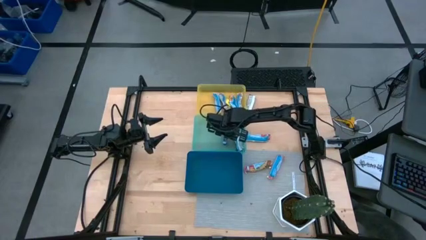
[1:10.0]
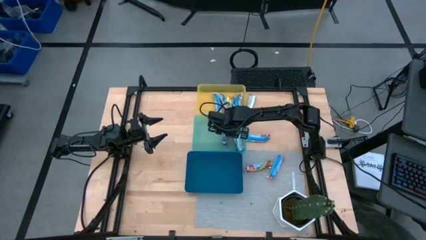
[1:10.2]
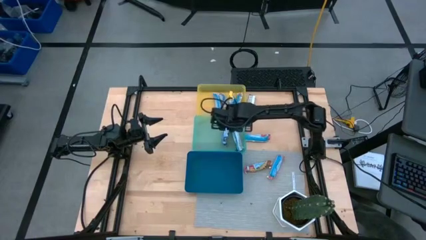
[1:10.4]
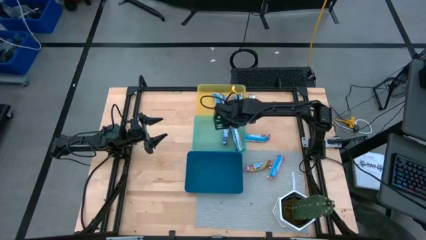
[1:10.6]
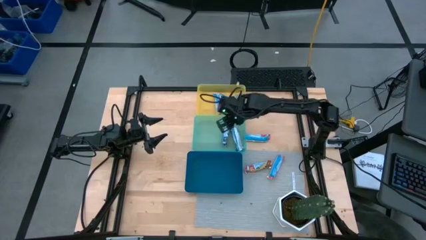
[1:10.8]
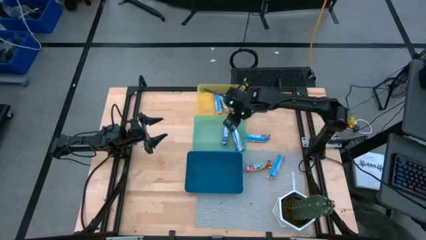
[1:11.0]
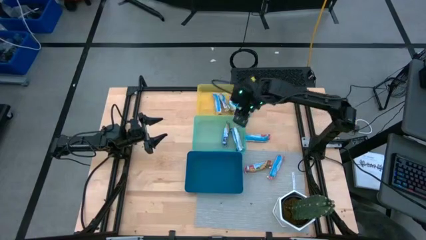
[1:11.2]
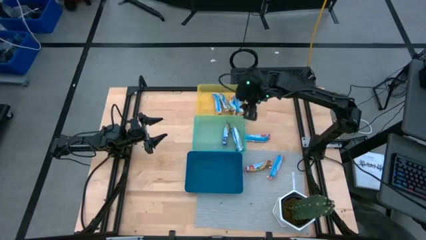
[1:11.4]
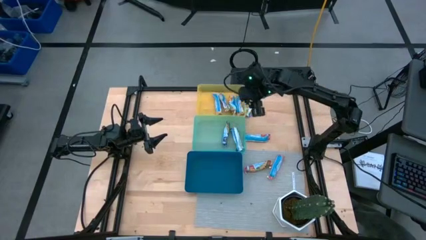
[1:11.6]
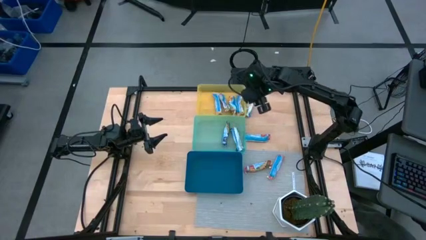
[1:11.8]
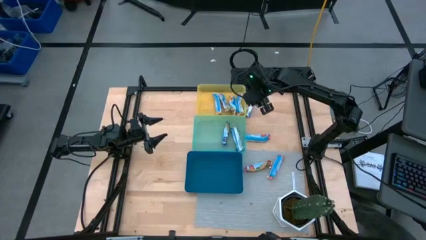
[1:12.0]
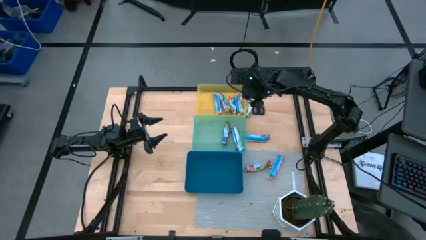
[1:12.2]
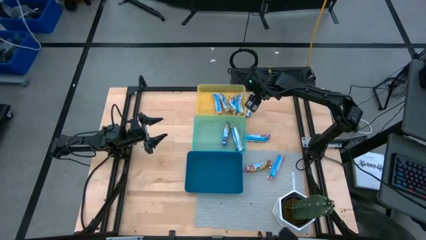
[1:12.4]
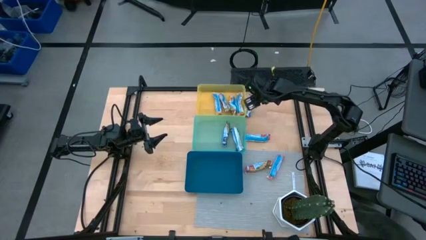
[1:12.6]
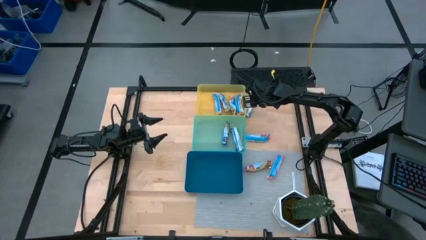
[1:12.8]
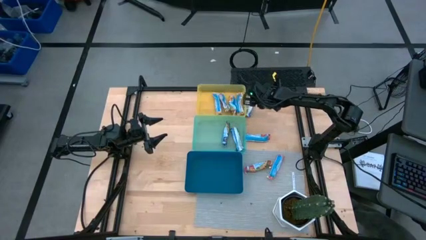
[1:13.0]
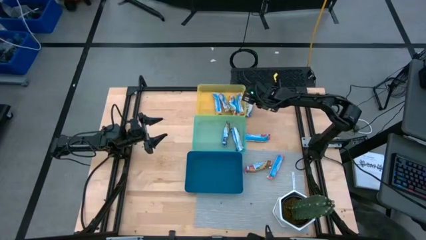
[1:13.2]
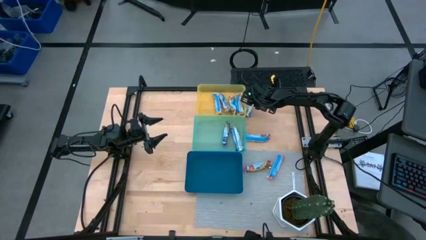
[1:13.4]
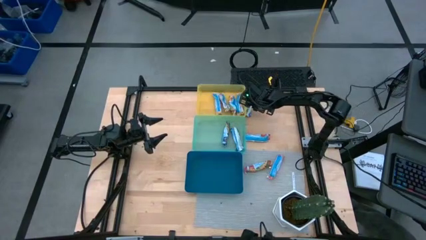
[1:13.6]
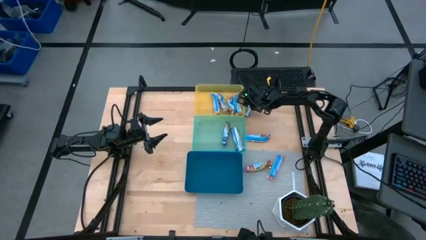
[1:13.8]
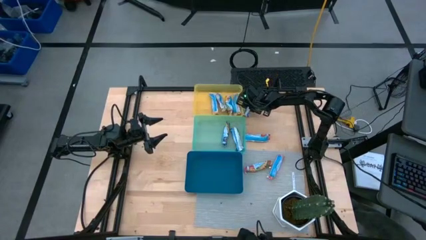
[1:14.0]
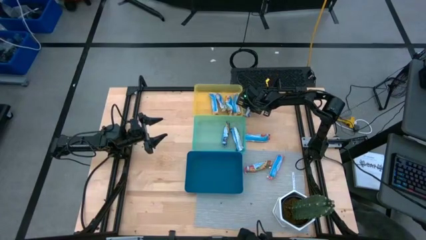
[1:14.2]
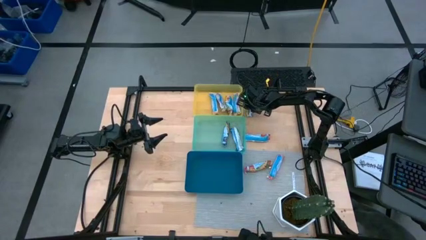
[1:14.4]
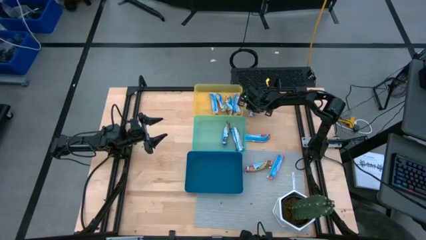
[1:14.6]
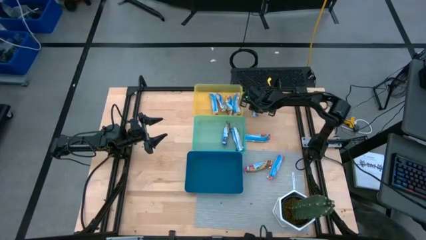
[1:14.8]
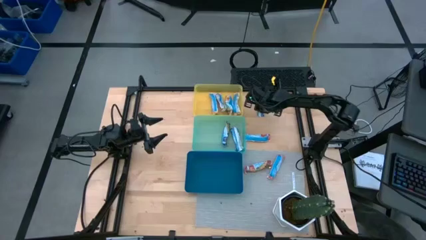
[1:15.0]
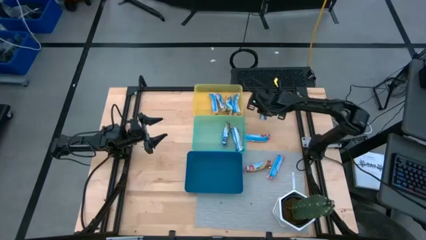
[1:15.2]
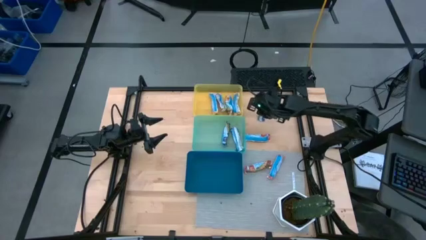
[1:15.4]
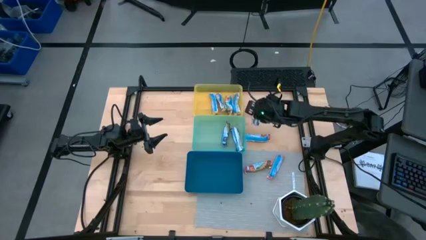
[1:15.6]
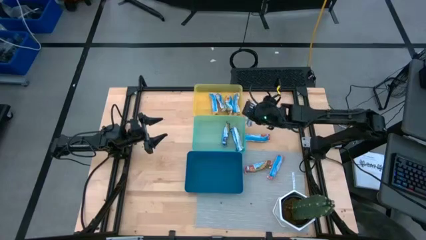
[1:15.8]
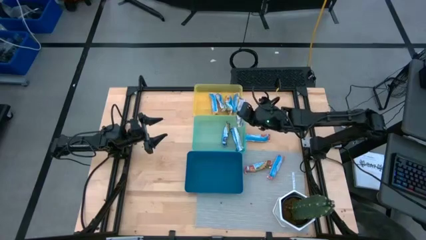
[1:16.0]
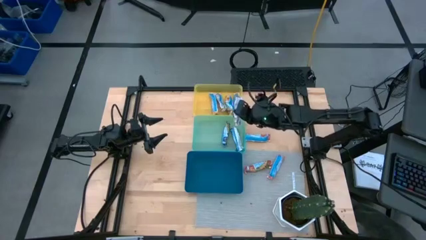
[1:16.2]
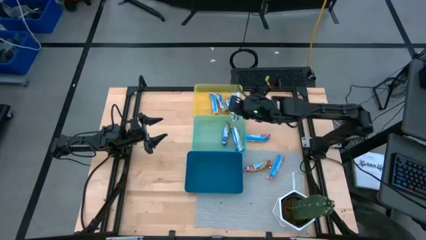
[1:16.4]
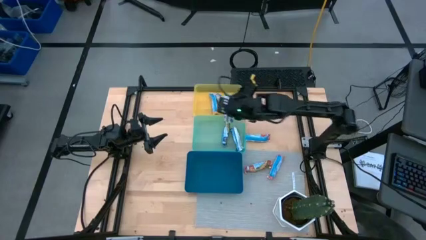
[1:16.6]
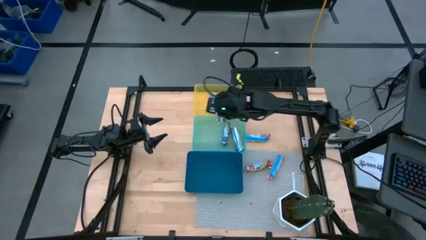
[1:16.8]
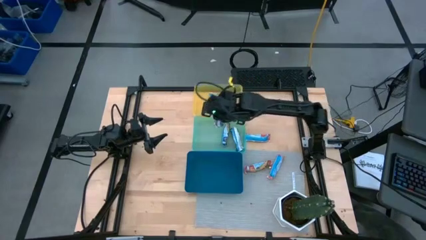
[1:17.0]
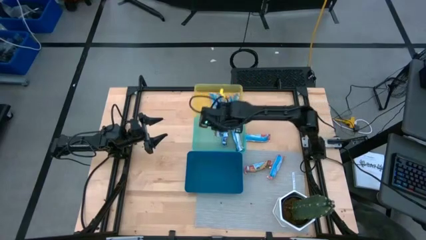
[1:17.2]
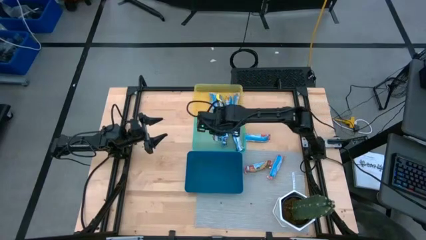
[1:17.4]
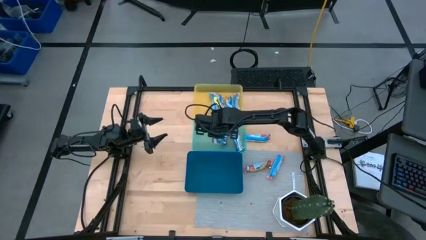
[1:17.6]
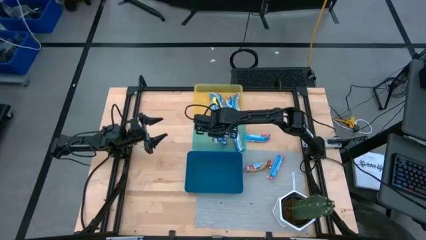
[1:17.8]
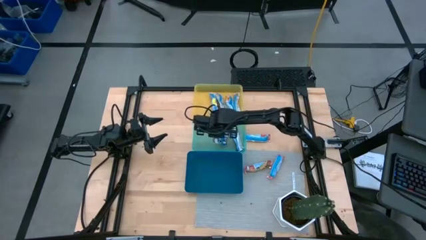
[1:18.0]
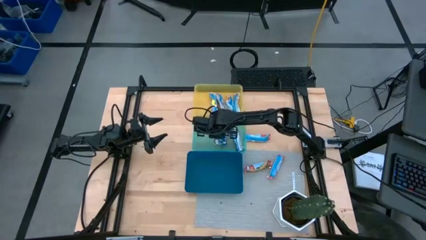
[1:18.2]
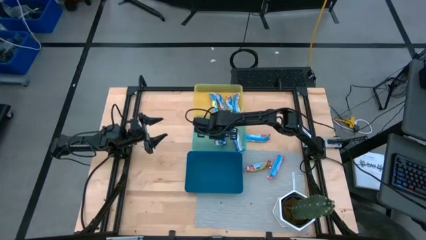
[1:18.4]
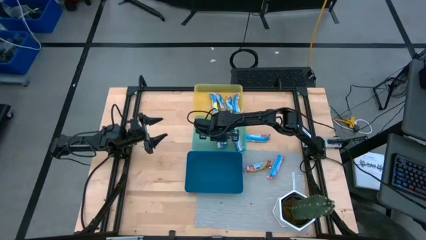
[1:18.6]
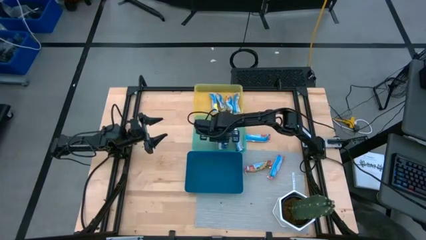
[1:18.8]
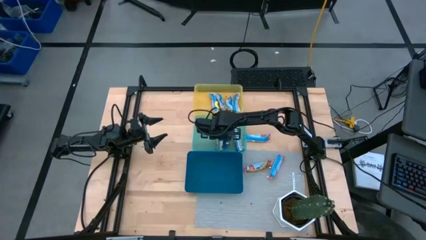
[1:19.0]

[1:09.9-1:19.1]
Task: Pick and place Granola Bars by type
Put the blue granola bar into the green bin

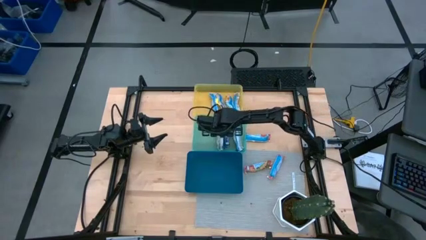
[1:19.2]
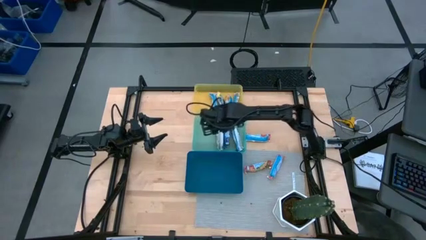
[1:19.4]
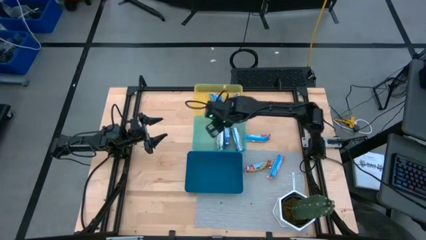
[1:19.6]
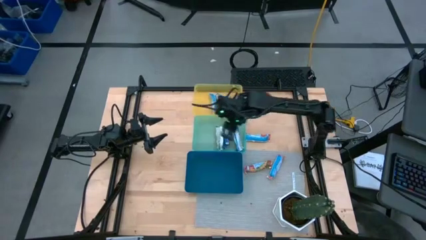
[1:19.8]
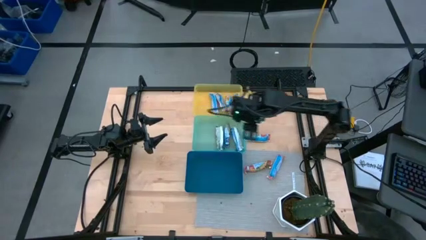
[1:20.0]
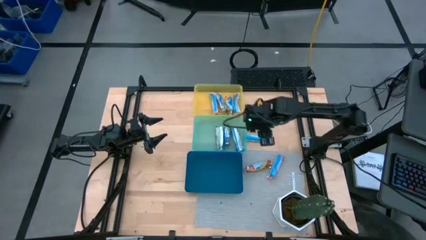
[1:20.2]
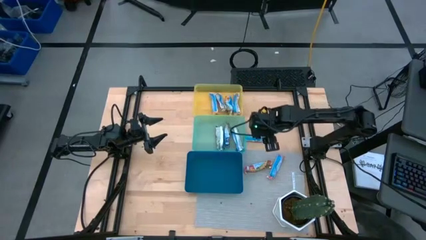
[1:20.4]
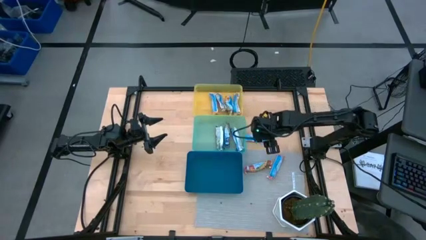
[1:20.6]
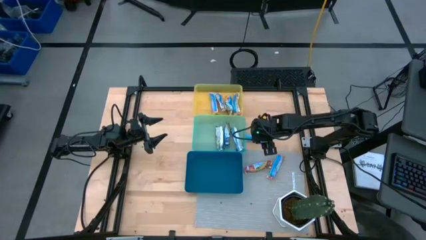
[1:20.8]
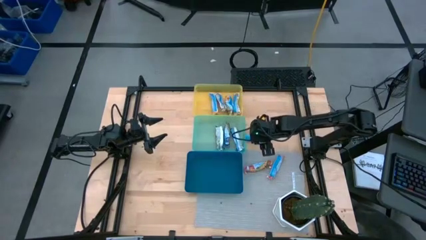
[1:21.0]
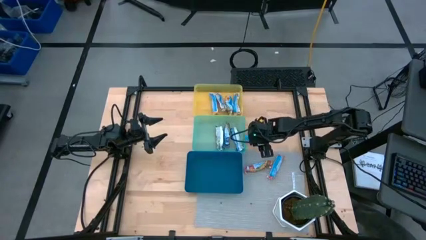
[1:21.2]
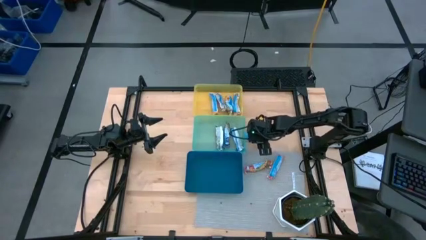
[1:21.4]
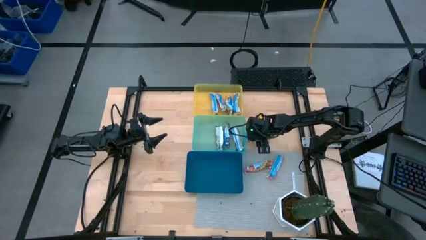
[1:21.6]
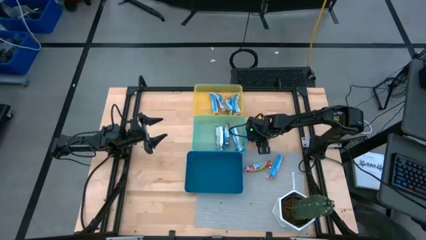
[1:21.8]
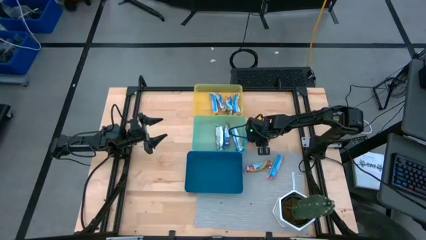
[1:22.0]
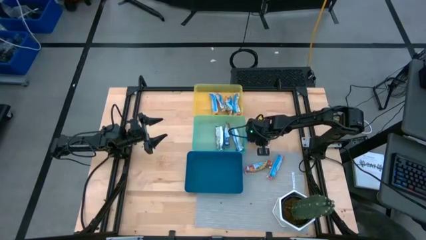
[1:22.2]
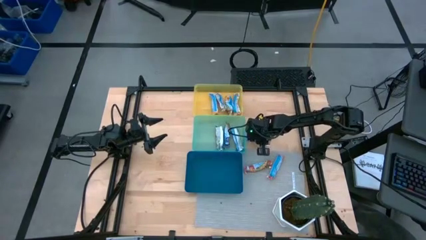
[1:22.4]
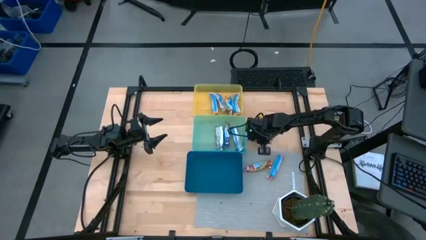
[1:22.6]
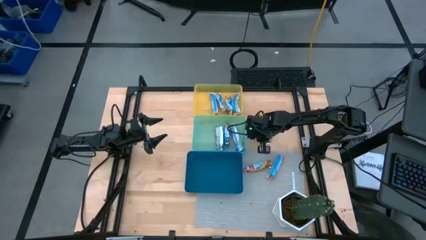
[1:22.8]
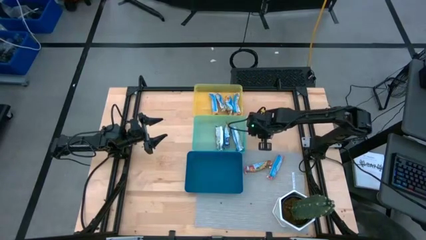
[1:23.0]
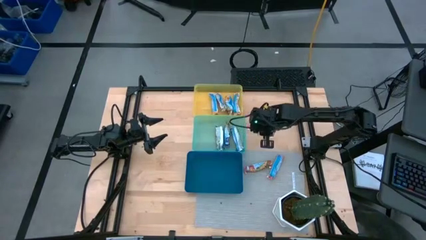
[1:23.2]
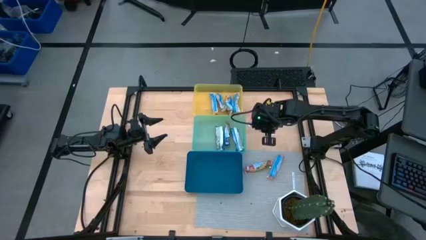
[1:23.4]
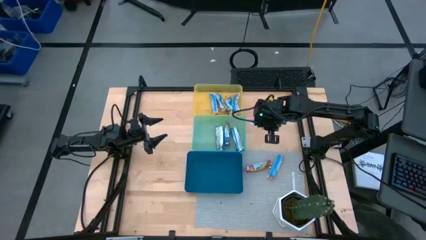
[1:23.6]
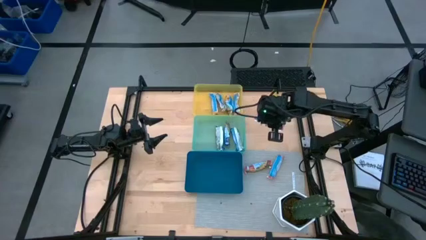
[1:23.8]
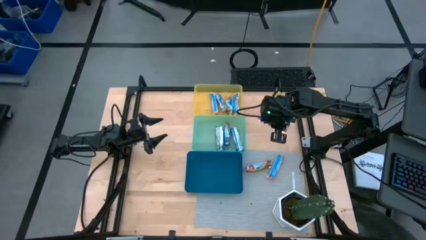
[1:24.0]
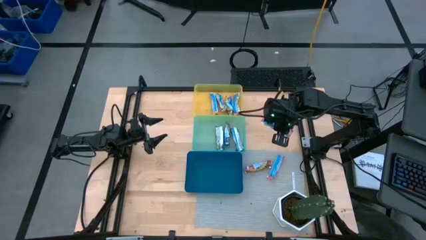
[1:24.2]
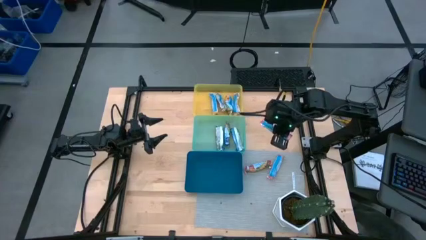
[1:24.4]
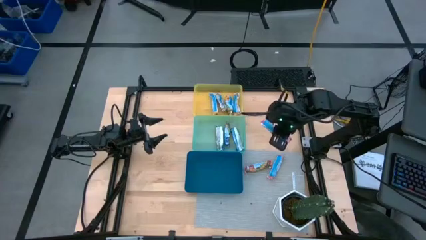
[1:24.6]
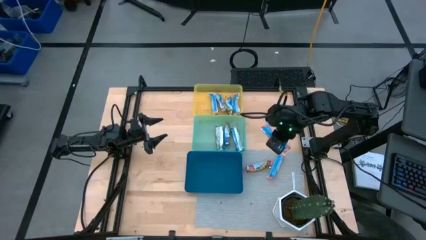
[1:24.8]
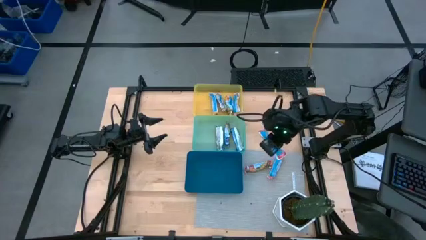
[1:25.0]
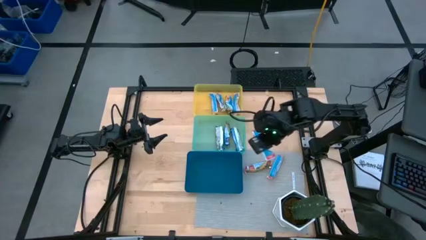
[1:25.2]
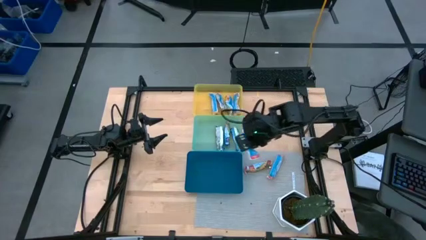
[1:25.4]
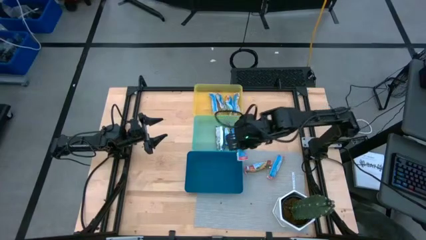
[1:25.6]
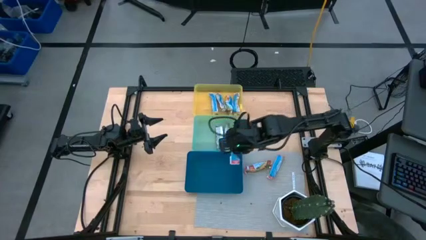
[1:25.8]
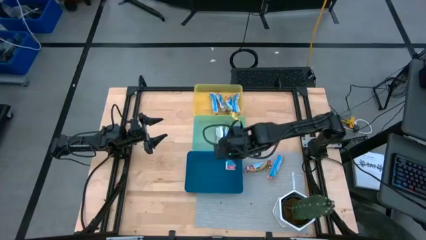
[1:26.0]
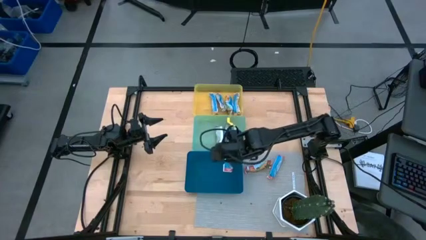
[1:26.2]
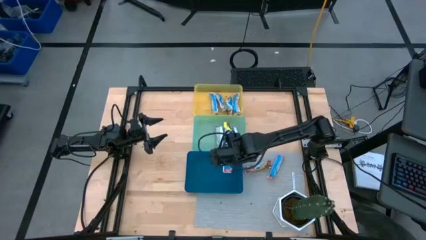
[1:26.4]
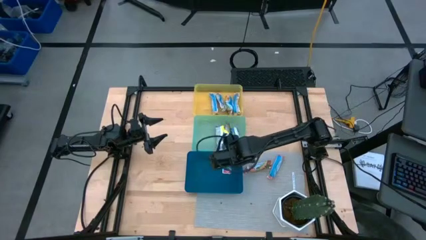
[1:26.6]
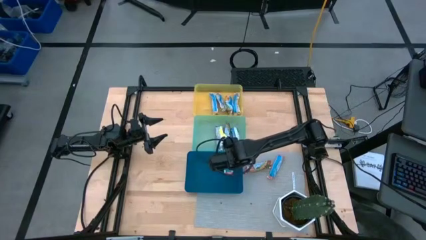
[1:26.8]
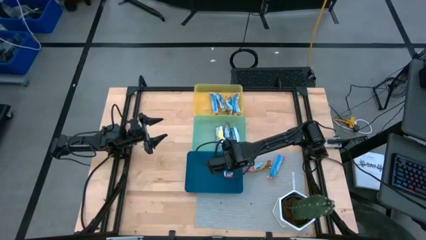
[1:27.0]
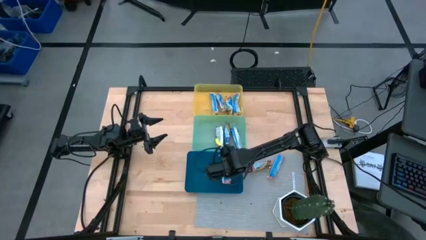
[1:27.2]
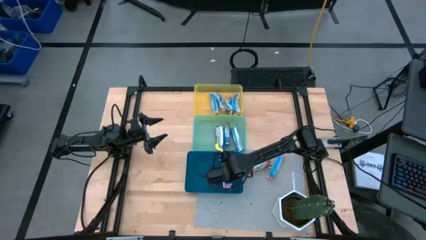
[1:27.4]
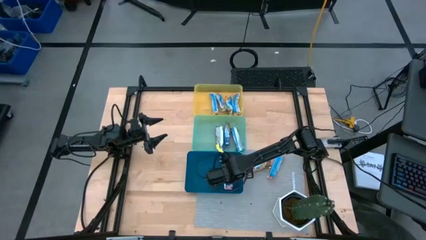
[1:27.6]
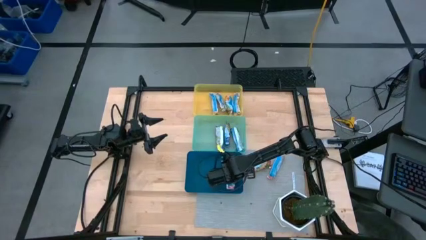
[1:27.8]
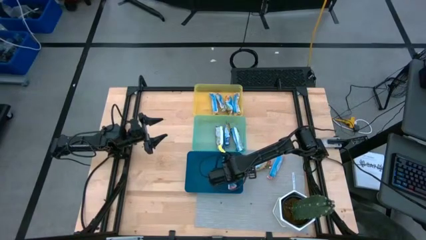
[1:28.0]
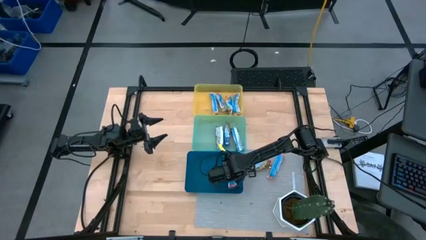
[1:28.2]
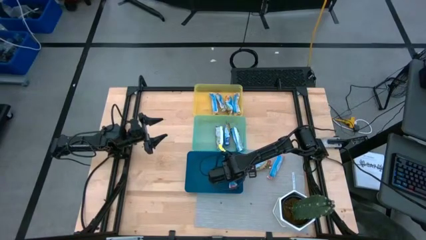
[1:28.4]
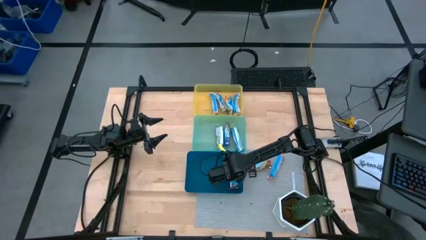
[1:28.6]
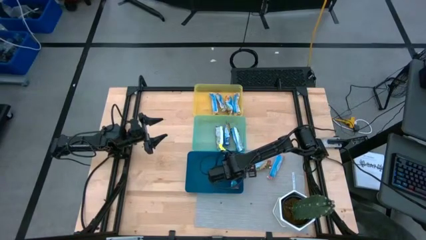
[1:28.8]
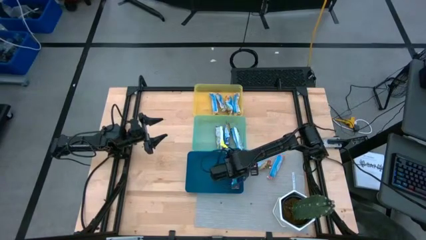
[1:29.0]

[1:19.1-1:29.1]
Put the red granola bar into the blue bin
